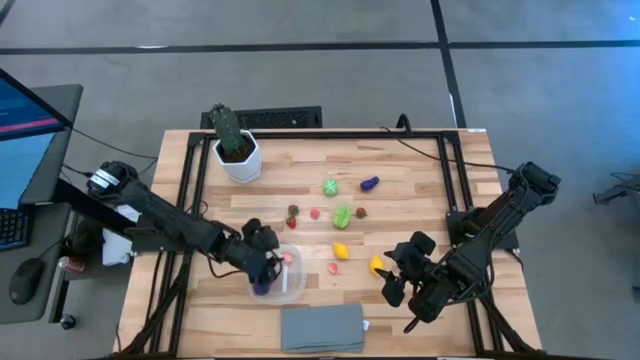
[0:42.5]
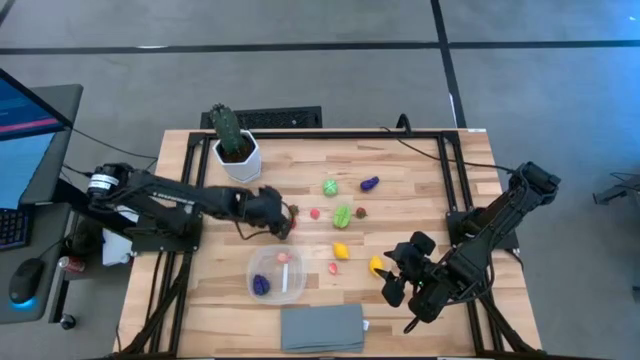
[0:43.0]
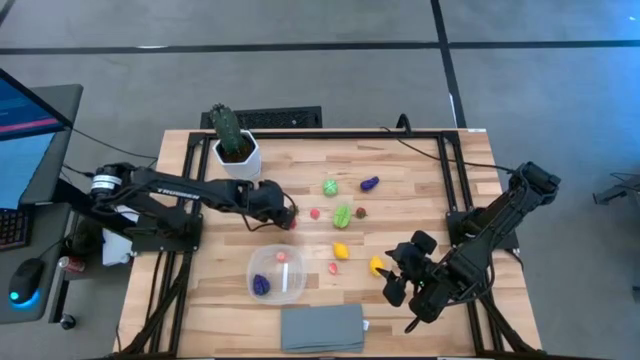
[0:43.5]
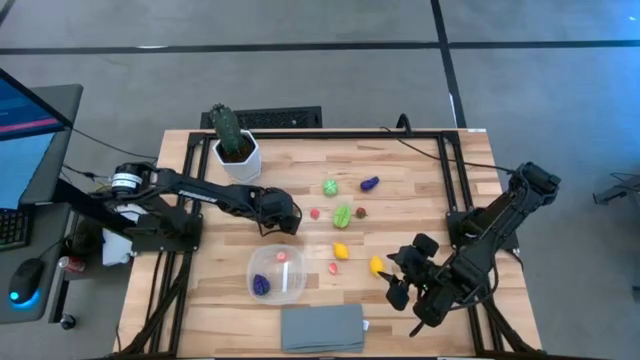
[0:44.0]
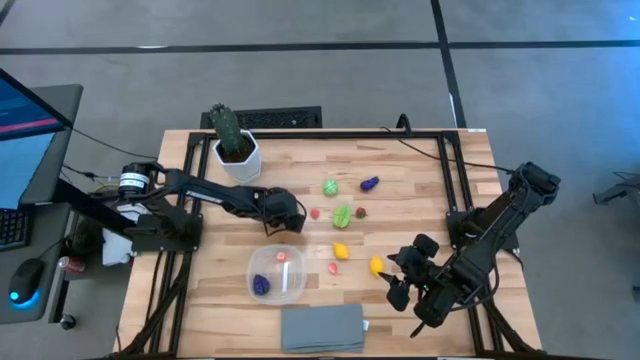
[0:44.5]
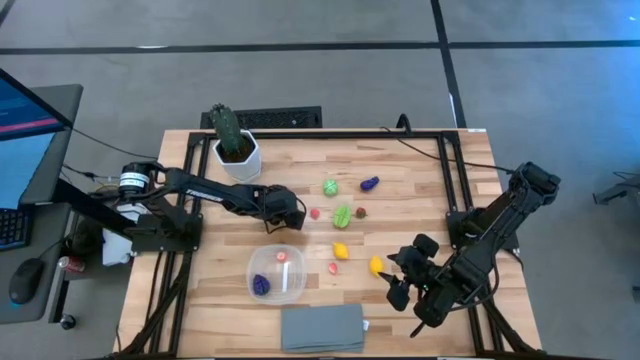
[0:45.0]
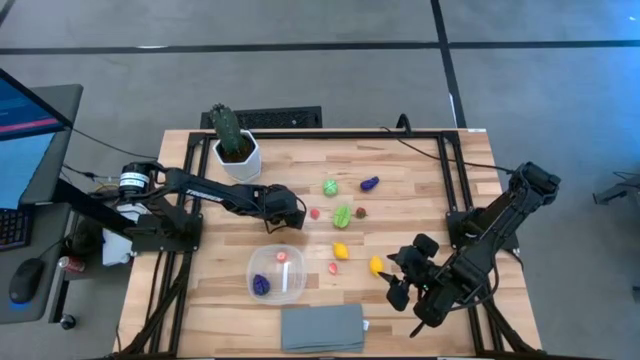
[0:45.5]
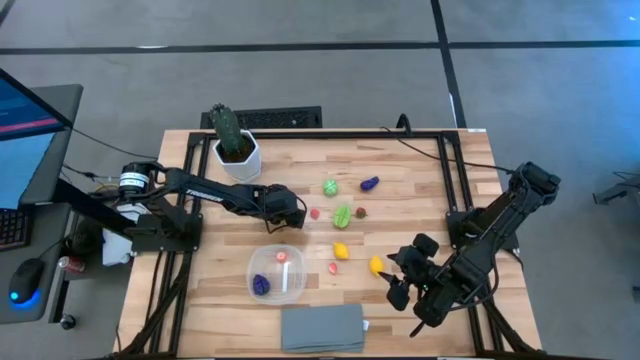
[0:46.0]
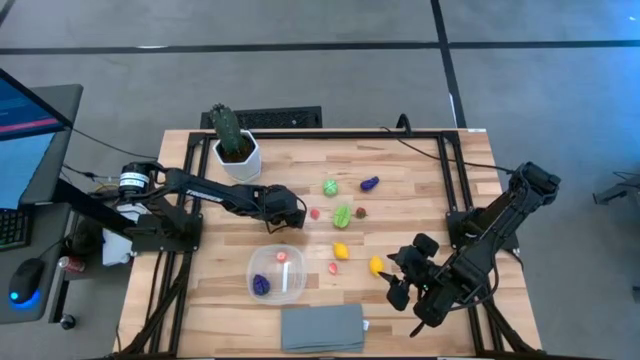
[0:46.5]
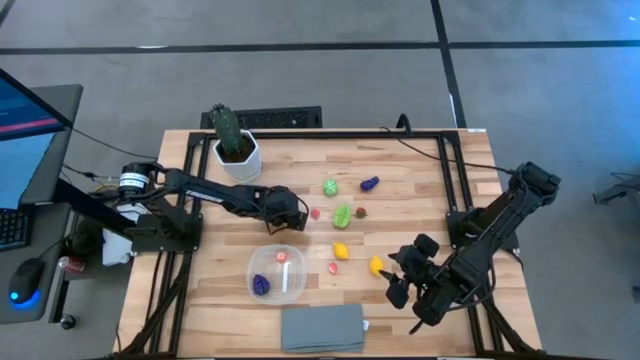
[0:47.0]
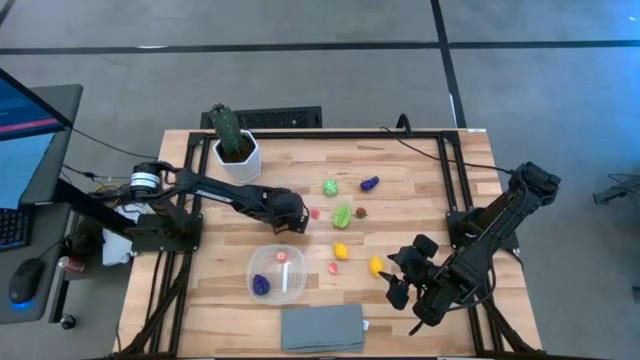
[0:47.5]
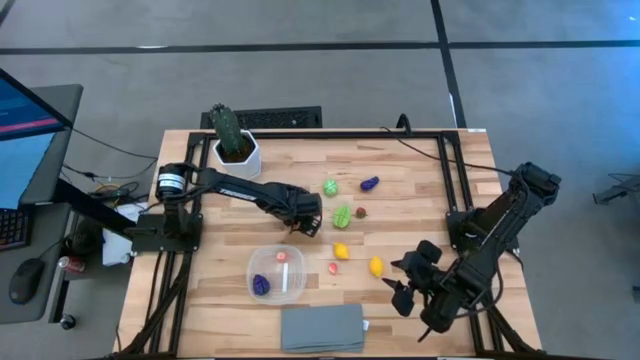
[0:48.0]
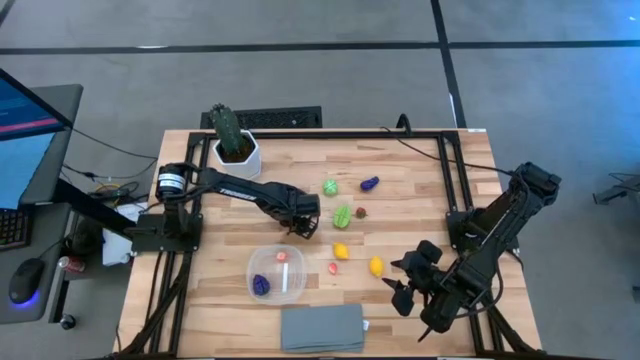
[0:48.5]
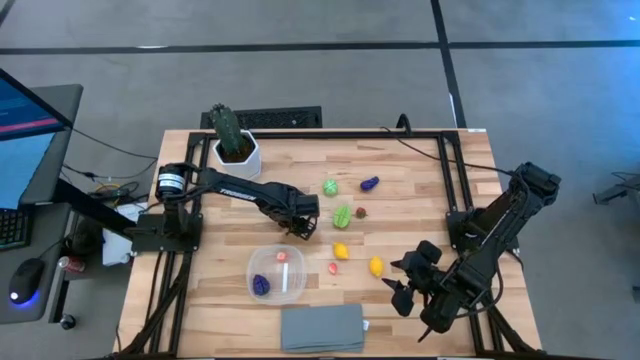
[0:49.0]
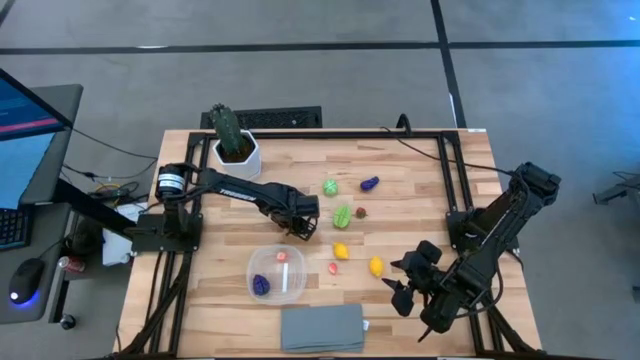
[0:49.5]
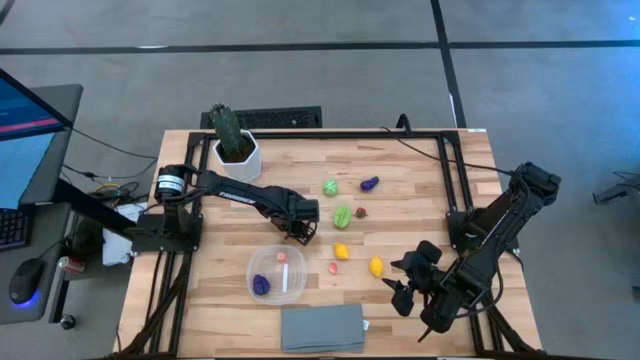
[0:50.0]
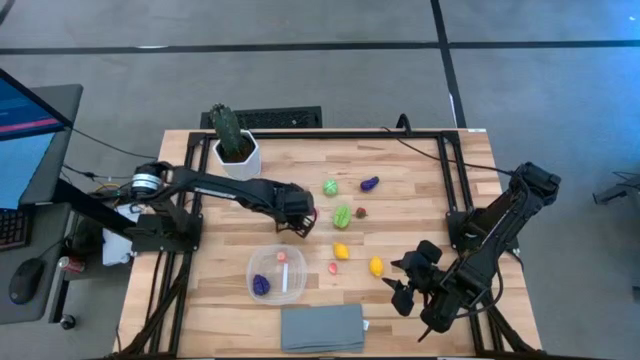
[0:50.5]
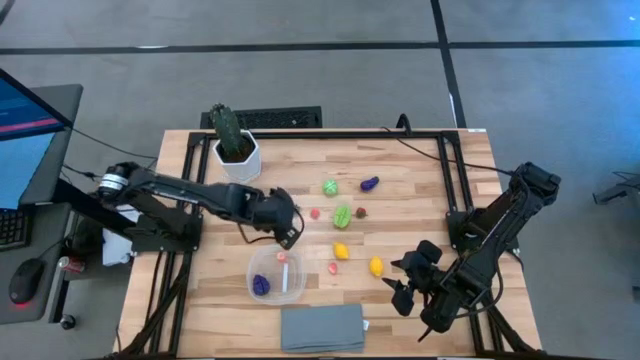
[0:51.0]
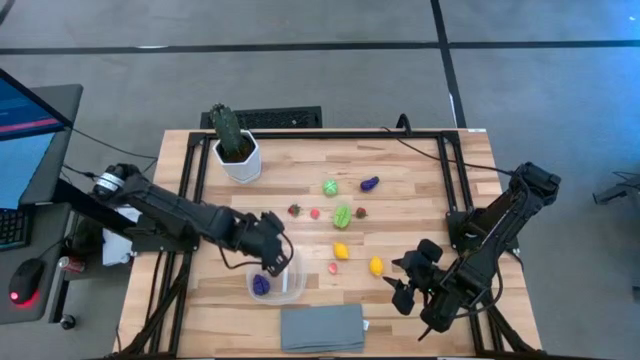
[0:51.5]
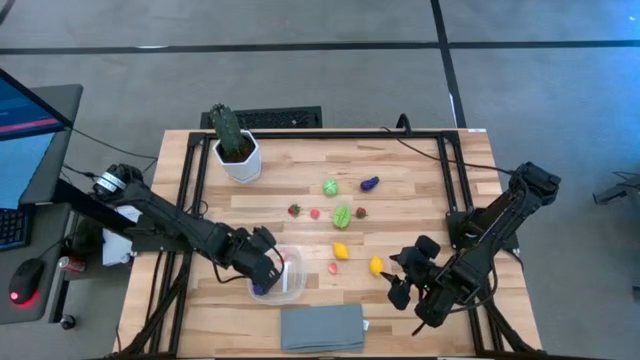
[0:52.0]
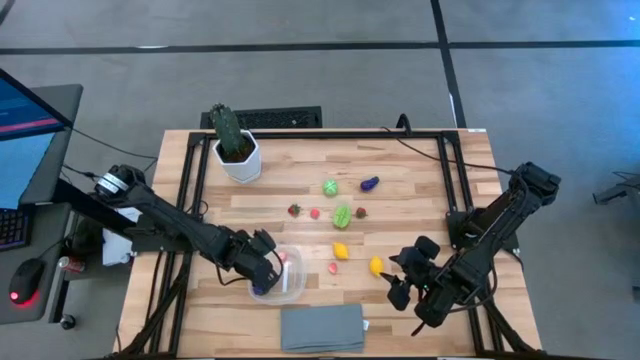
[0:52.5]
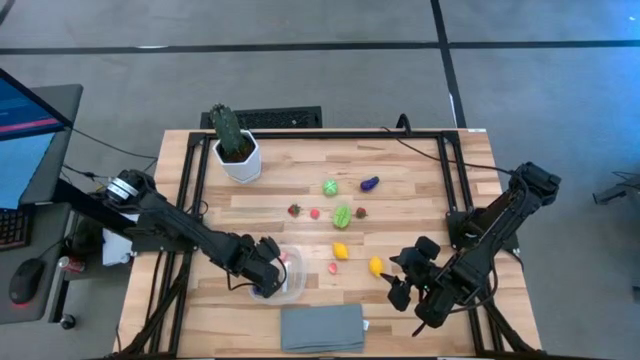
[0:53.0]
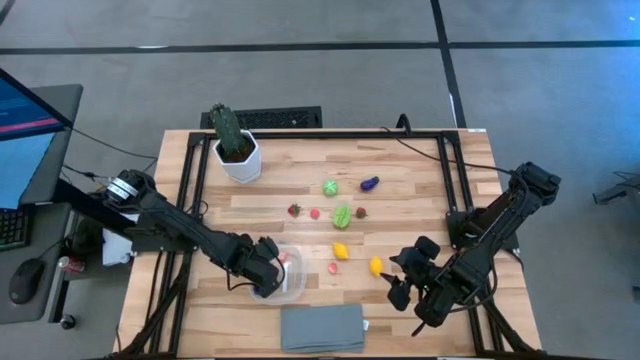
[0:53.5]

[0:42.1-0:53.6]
Task: Pick and placing Produce into tupperware
Put the bottom strawberry into the transparent bin

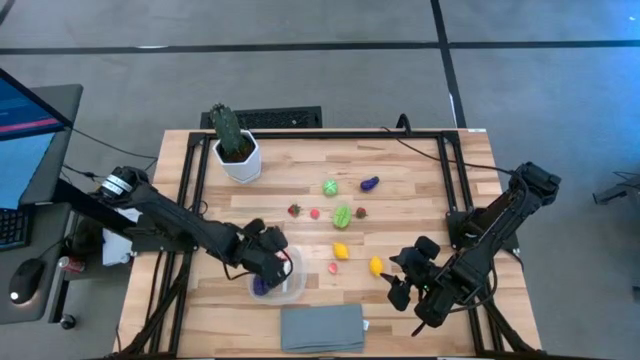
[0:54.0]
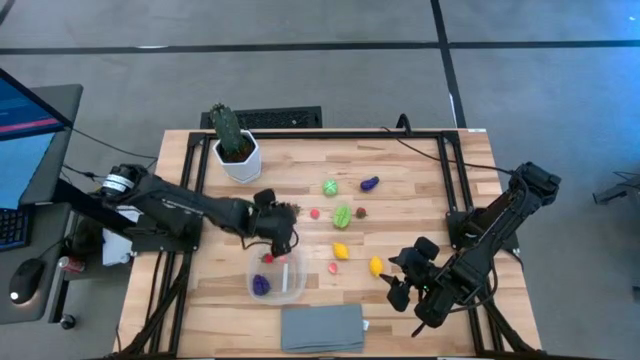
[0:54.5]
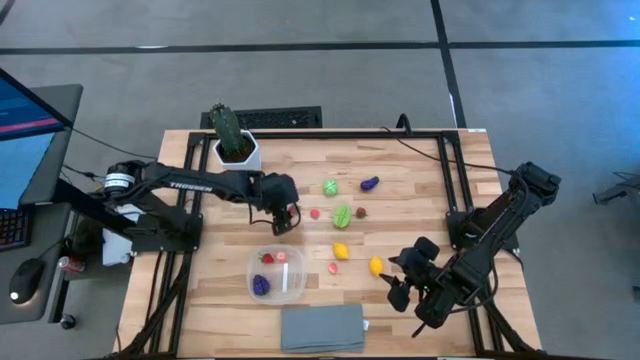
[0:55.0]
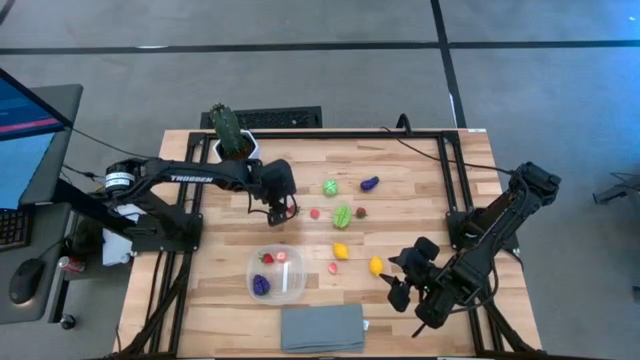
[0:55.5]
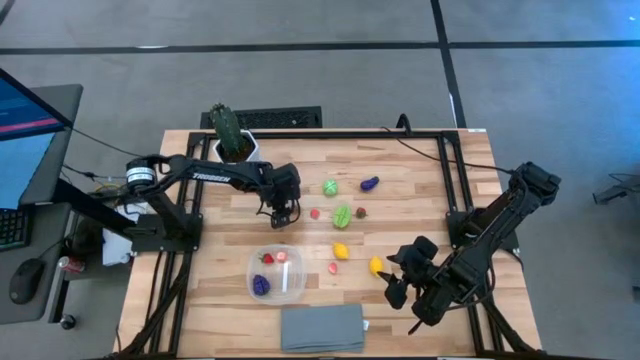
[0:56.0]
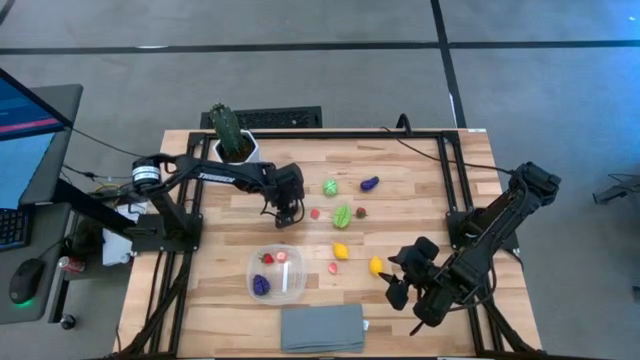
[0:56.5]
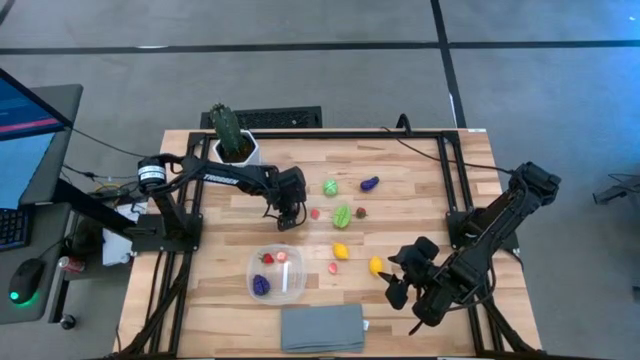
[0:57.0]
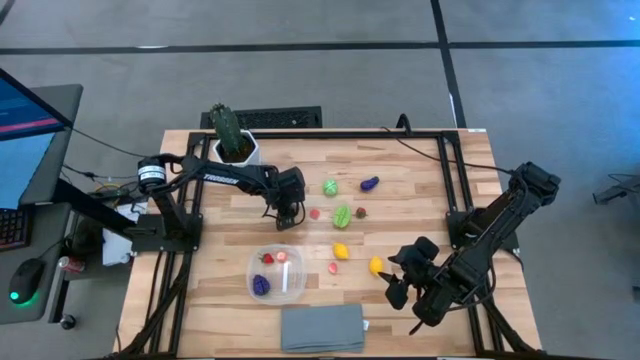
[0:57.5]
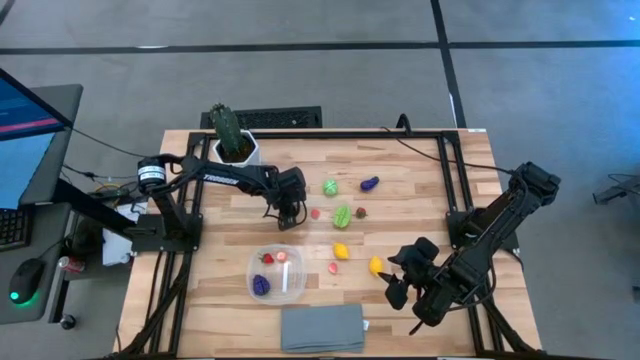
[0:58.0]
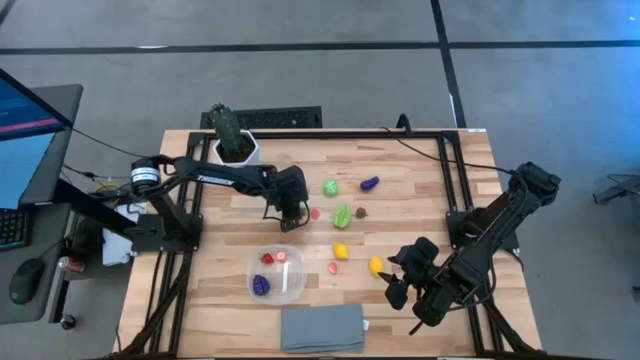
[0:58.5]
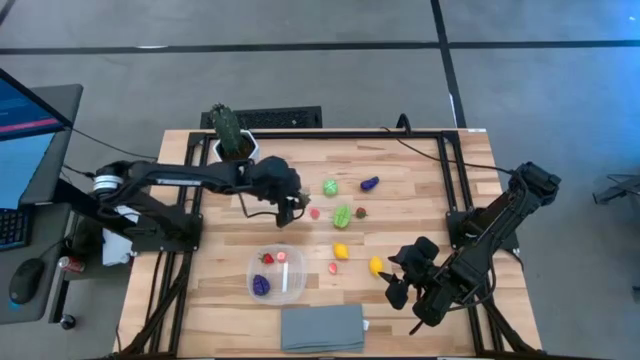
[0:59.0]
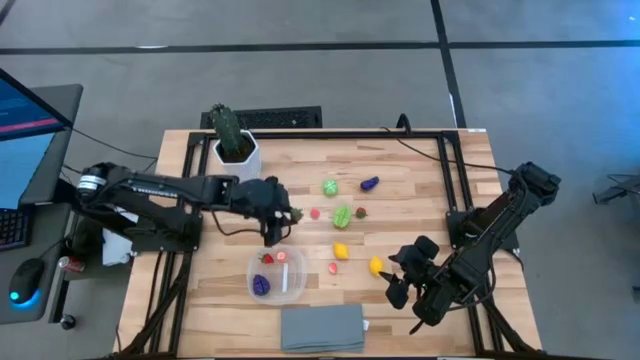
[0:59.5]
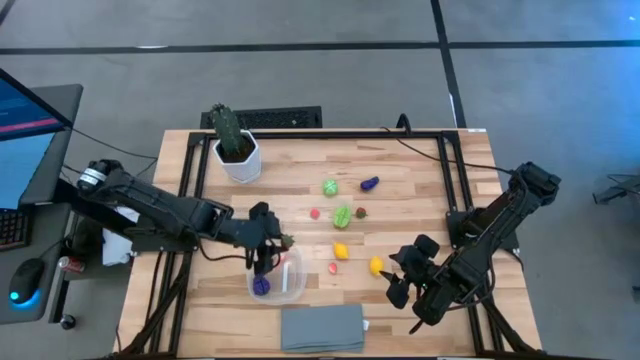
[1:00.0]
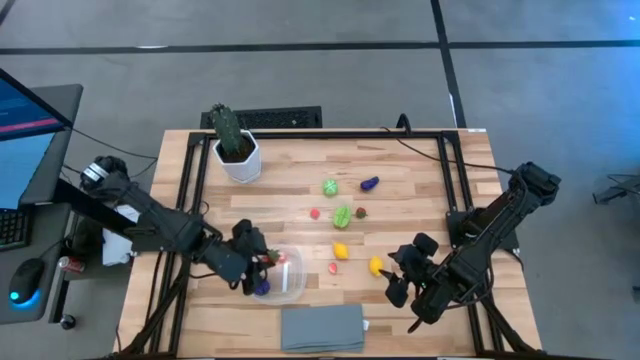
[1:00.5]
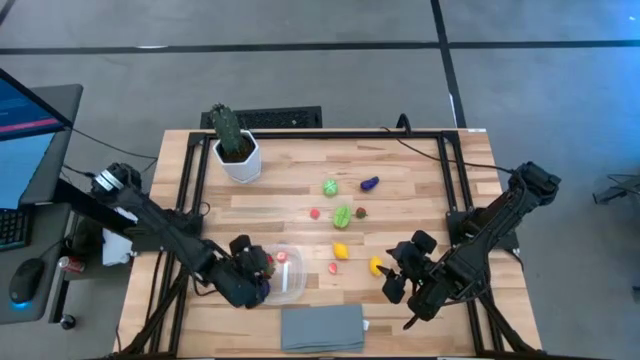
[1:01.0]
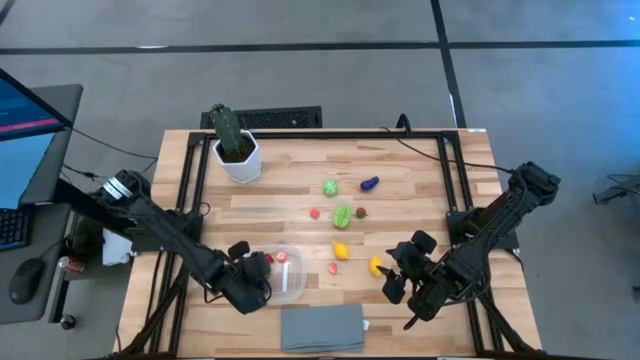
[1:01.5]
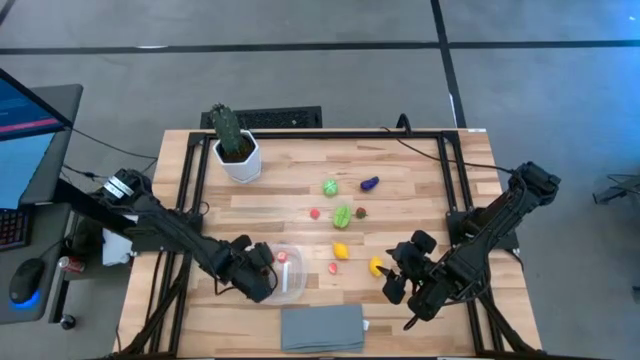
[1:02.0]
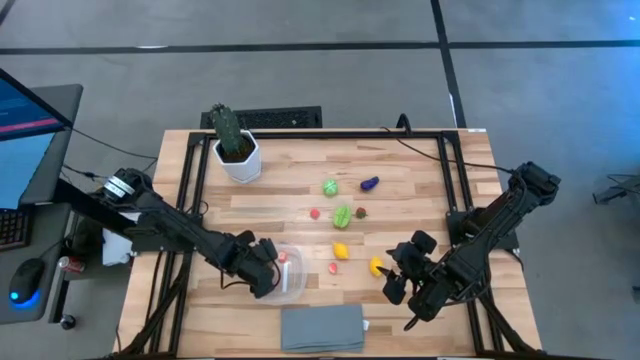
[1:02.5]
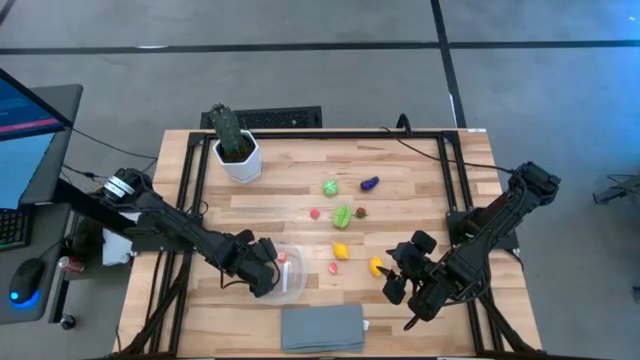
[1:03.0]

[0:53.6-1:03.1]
Put the left strawberry into the transparent bin
